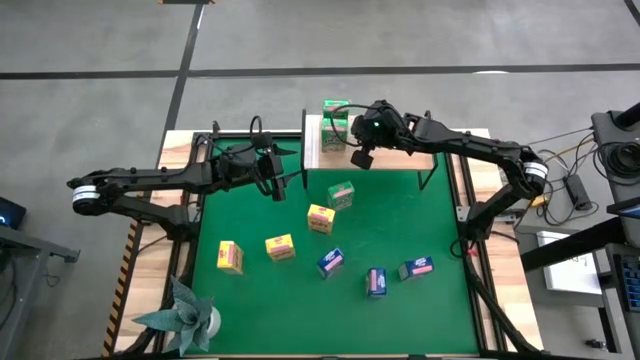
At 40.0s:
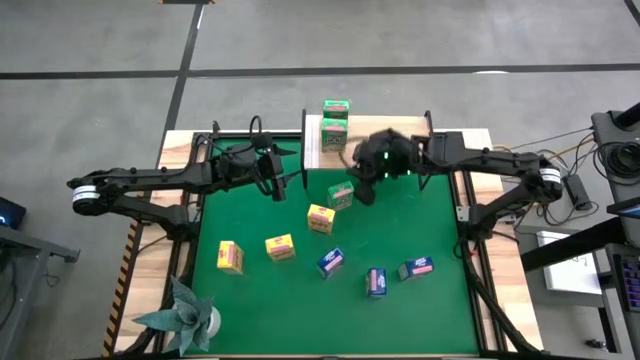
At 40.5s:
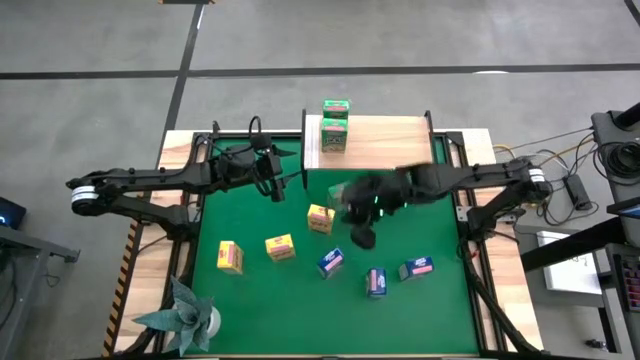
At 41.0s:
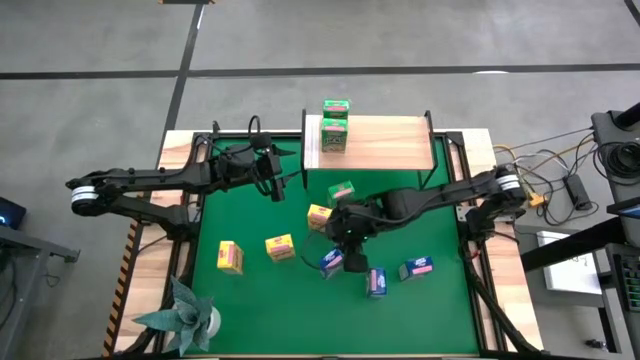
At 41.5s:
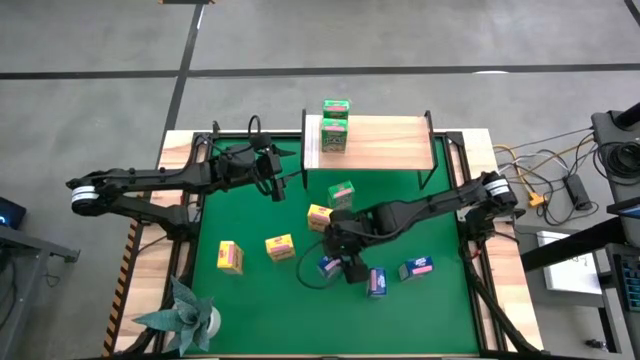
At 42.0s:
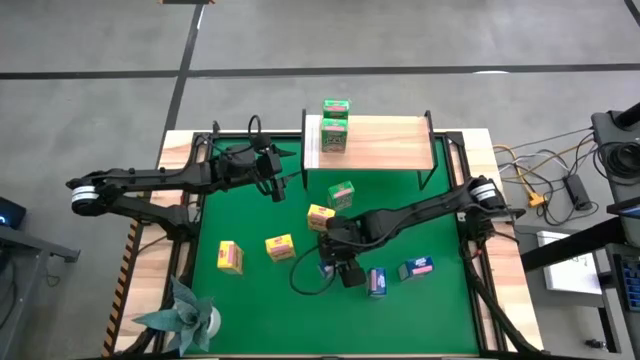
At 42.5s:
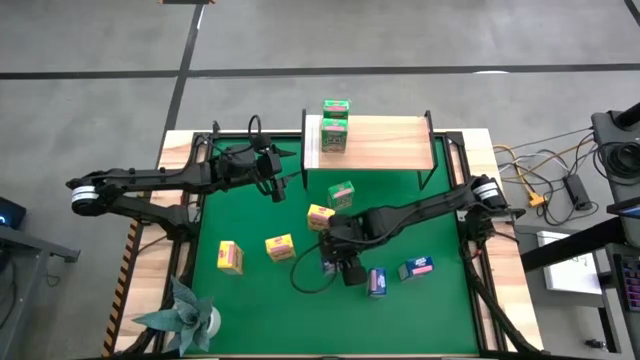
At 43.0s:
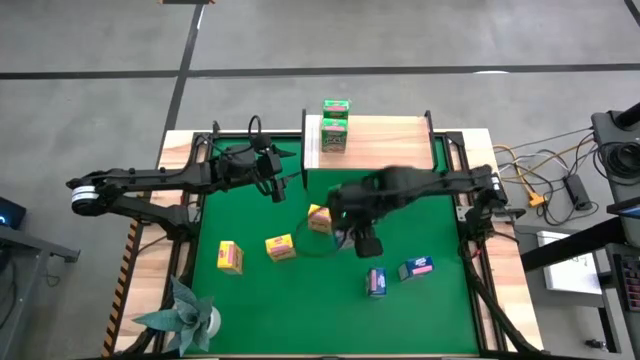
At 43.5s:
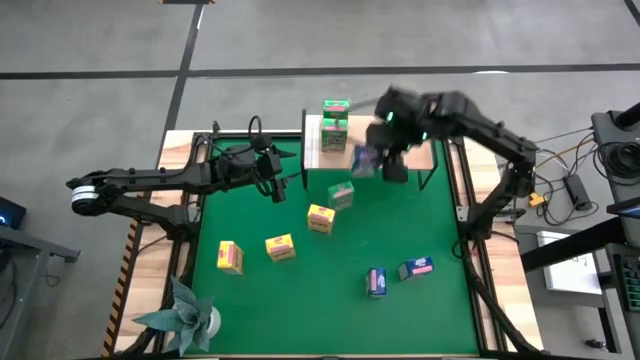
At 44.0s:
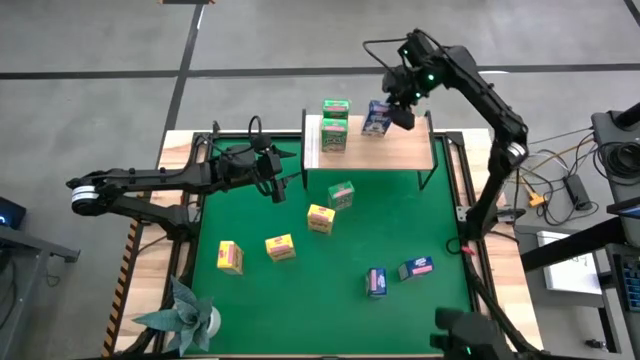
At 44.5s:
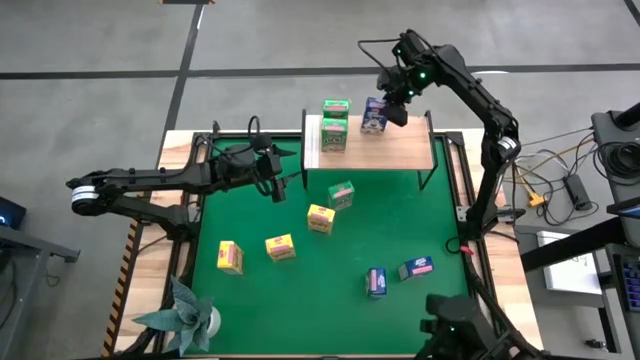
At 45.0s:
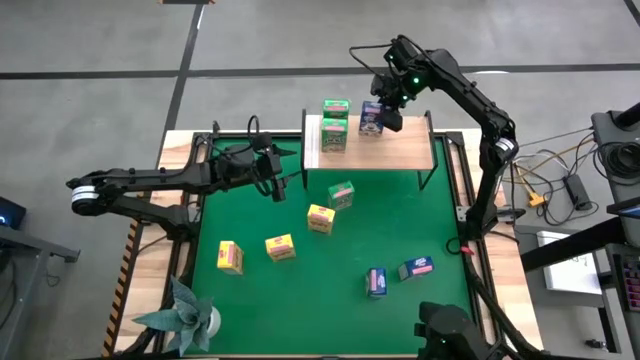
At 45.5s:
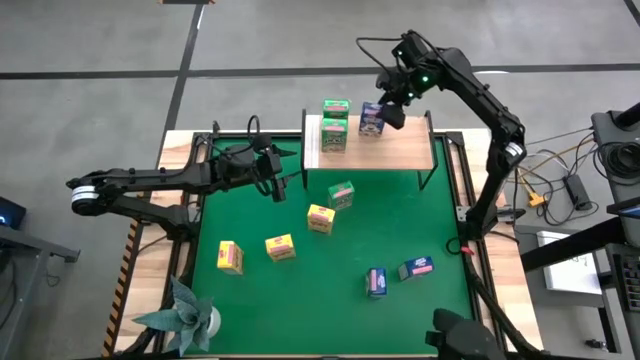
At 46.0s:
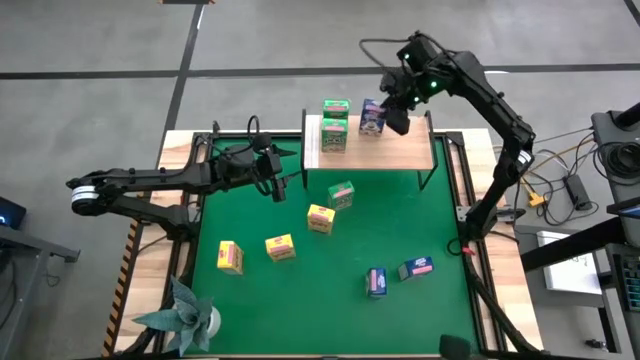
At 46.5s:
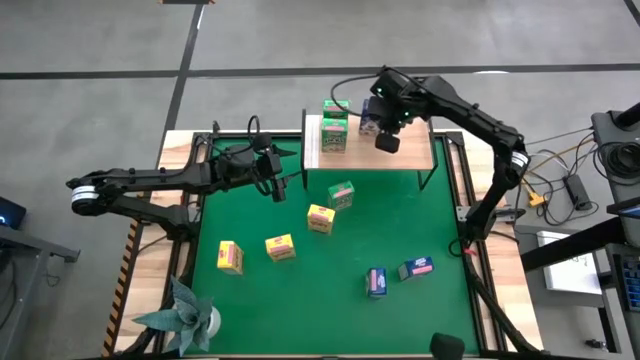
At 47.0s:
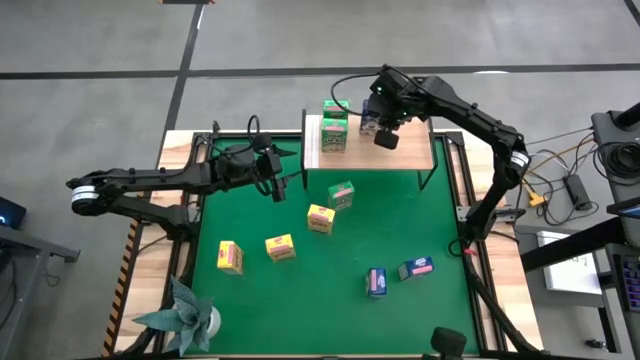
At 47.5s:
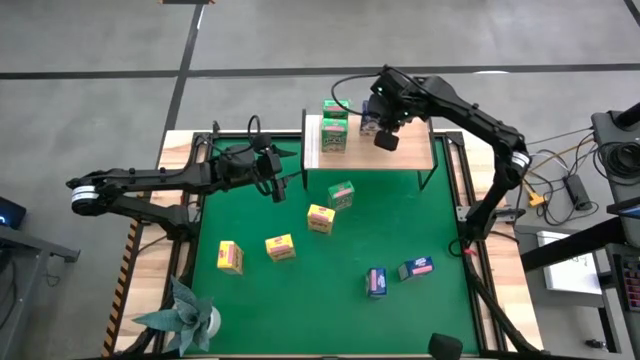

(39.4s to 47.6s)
Task: Stack cereal on shelf
Put the left blue cereal box on the shelf

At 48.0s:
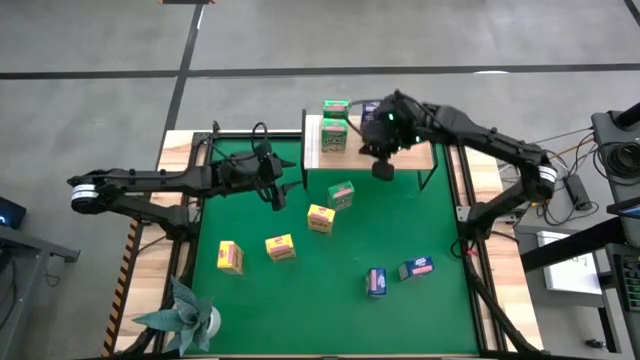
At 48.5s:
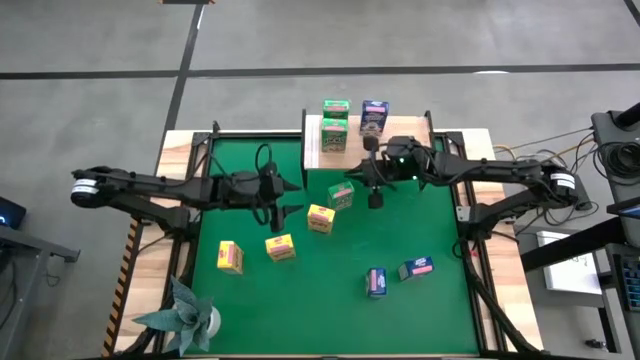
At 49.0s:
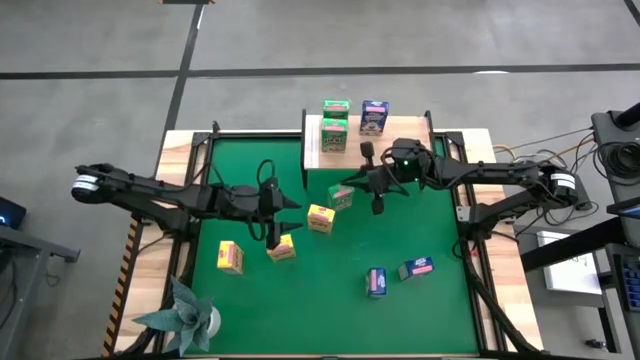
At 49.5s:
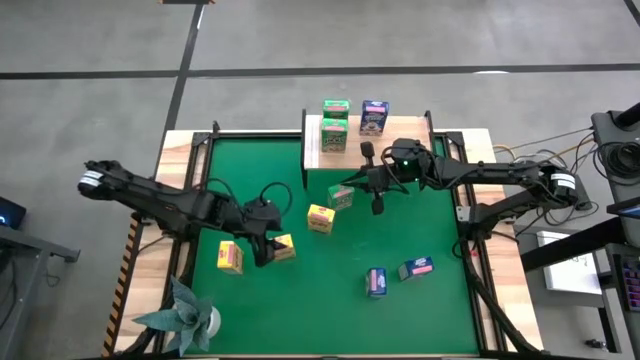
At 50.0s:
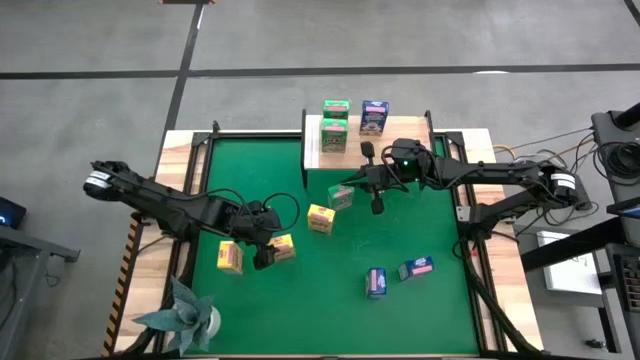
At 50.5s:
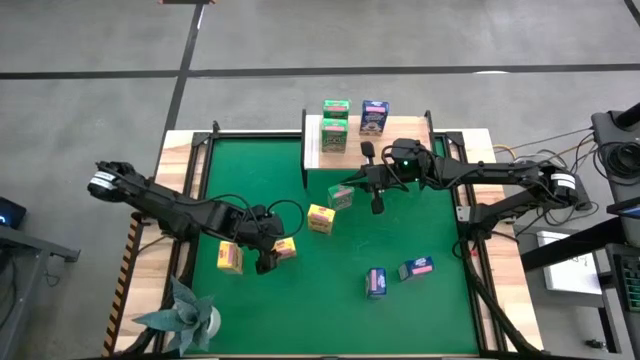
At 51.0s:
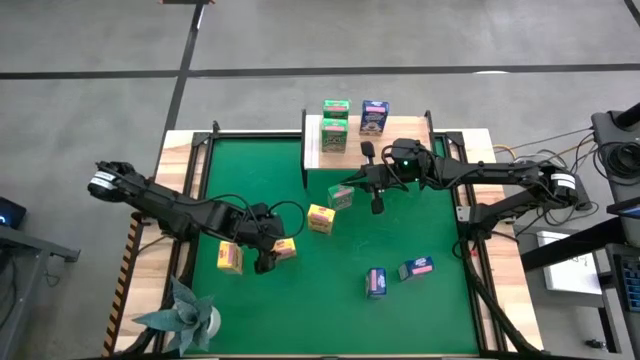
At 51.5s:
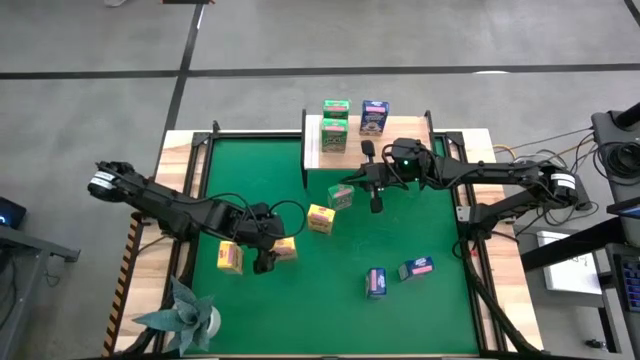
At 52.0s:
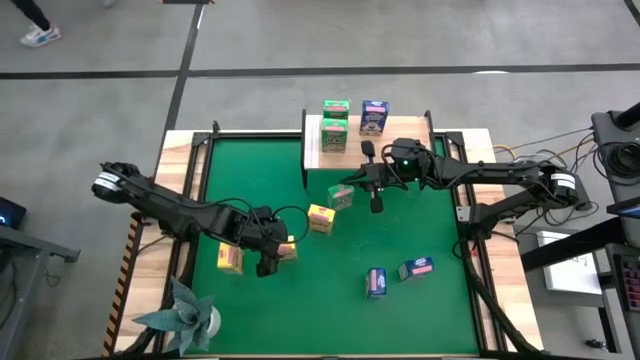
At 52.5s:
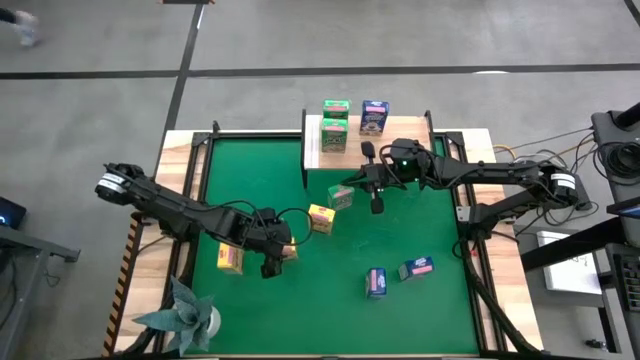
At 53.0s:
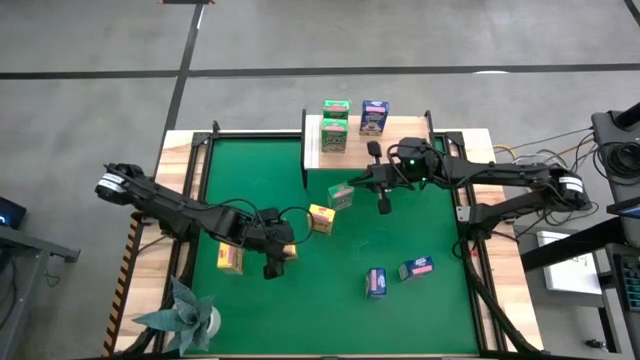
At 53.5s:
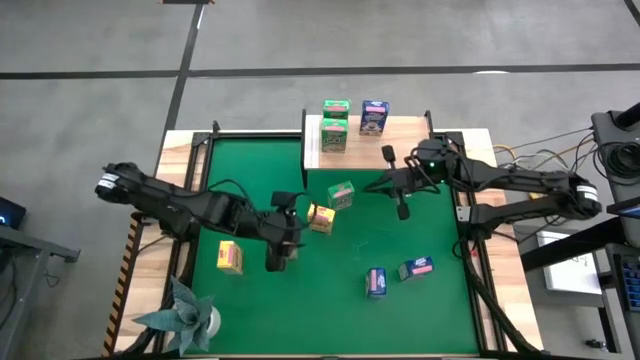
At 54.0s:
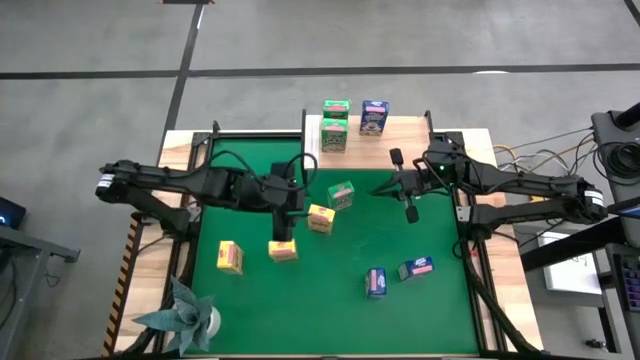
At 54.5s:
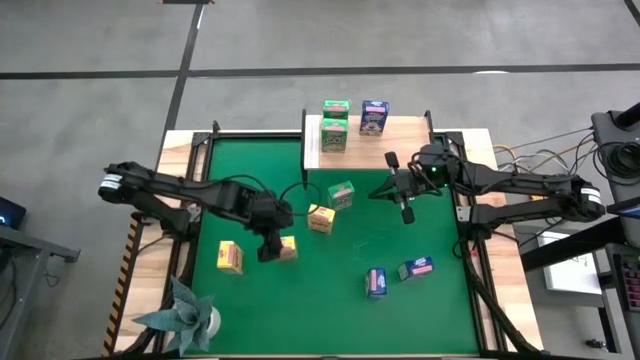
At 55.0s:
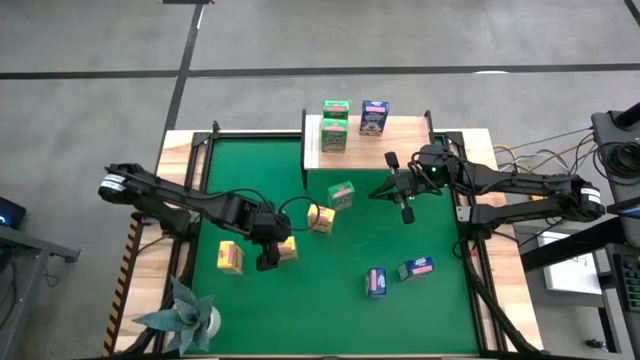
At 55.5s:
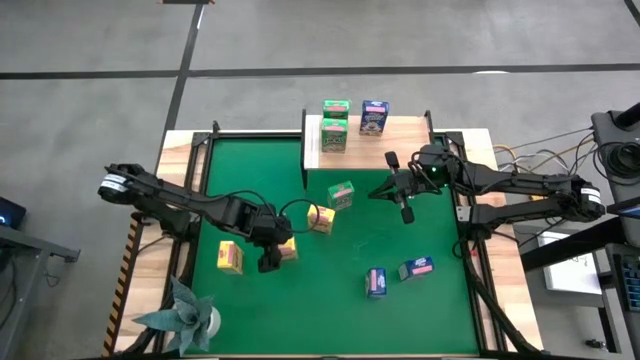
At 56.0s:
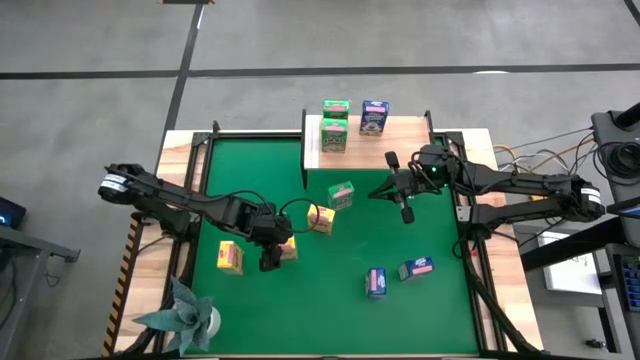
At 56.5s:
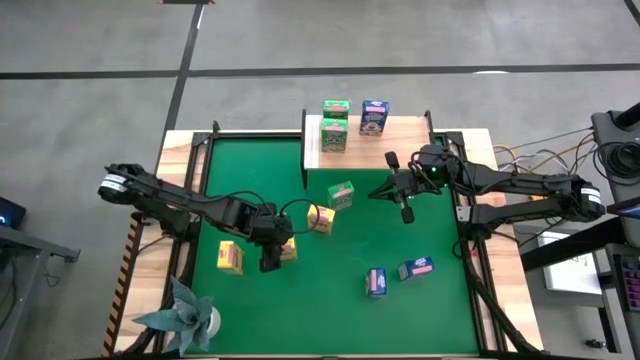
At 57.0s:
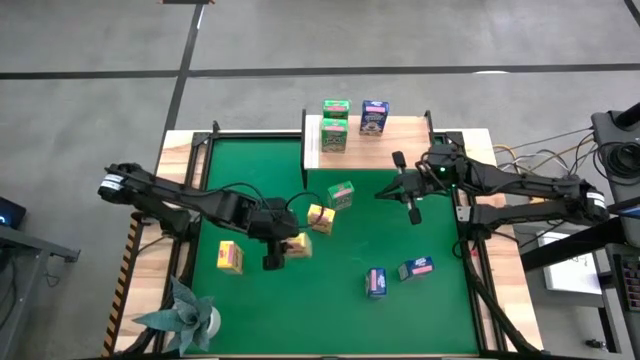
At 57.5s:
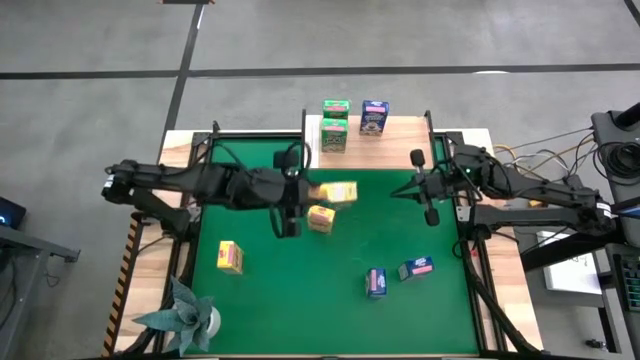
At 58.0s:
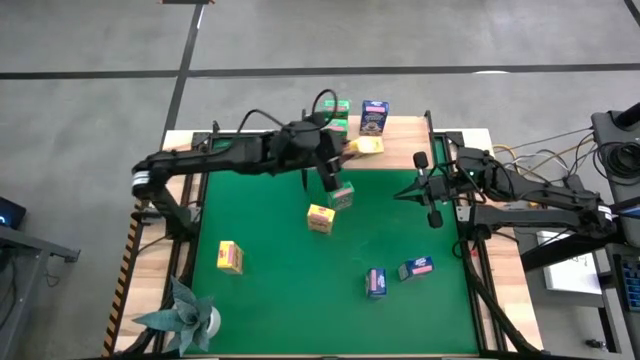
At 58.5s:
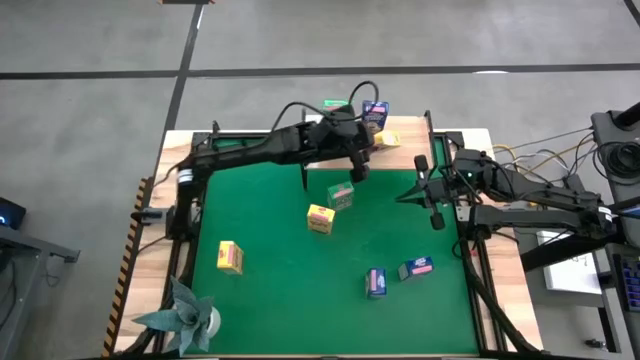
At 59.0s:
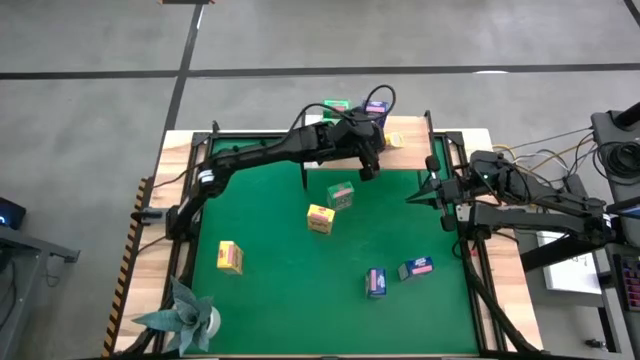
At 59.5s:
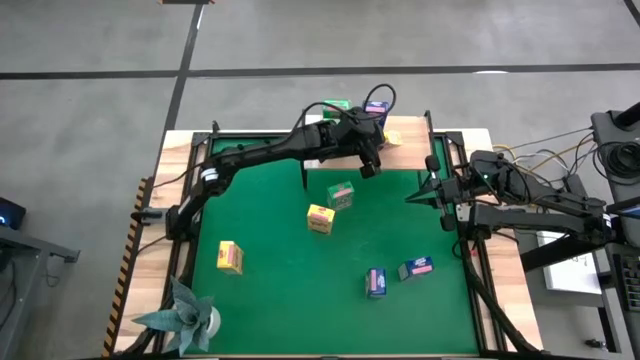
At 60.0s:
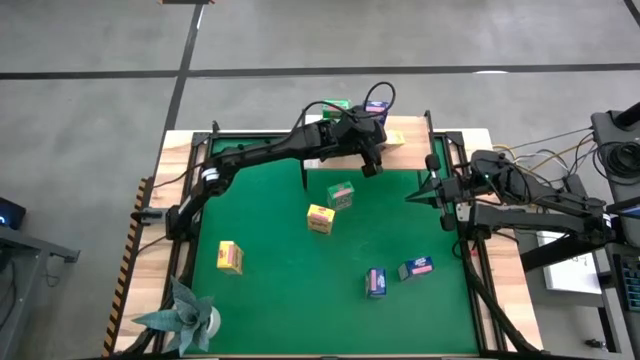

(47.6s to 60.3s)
Put the middle yellow cereal box on the shelf
